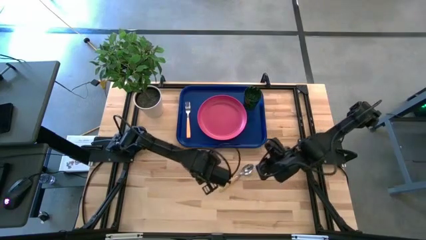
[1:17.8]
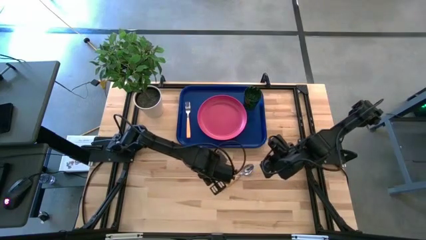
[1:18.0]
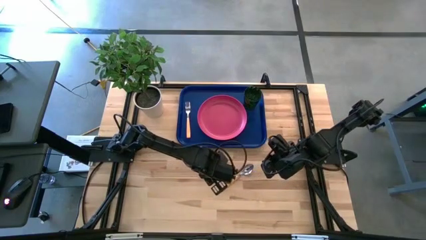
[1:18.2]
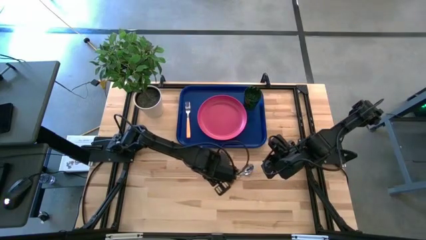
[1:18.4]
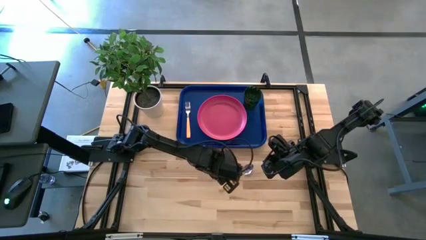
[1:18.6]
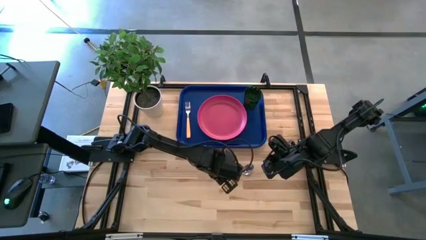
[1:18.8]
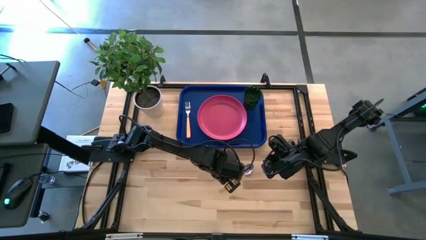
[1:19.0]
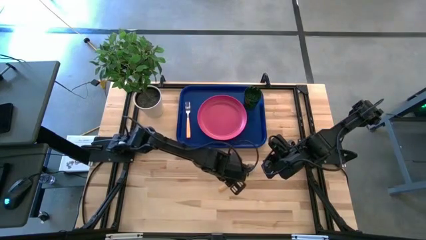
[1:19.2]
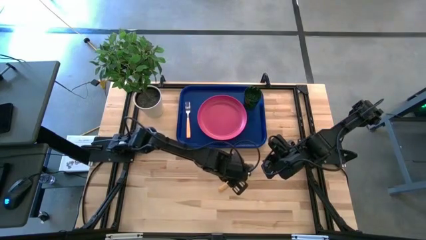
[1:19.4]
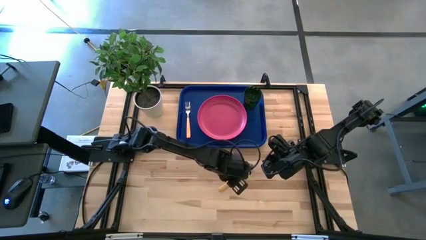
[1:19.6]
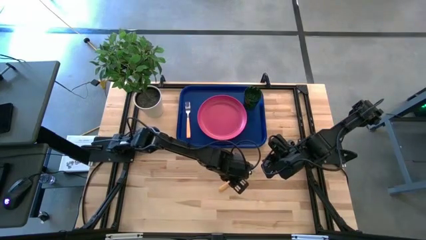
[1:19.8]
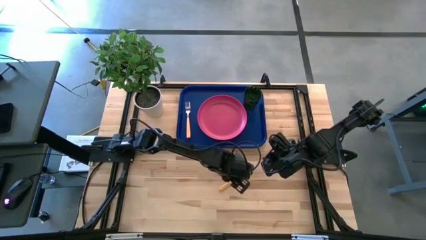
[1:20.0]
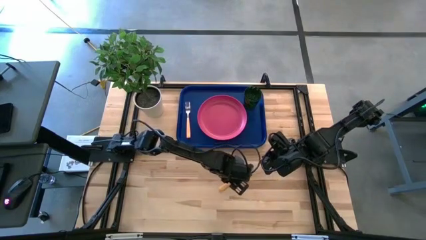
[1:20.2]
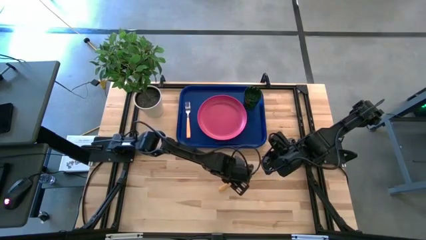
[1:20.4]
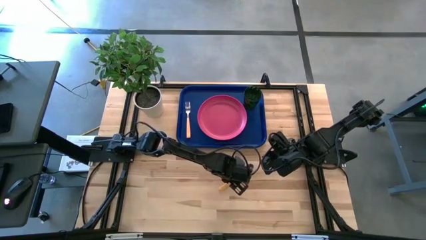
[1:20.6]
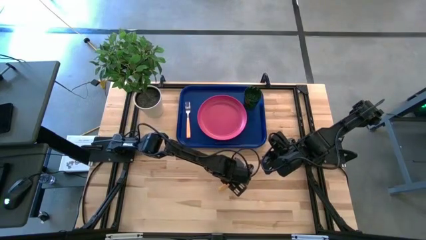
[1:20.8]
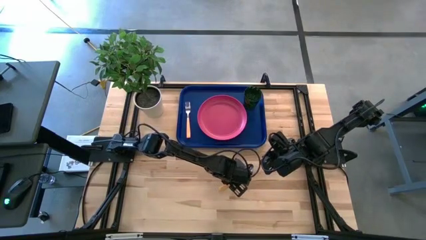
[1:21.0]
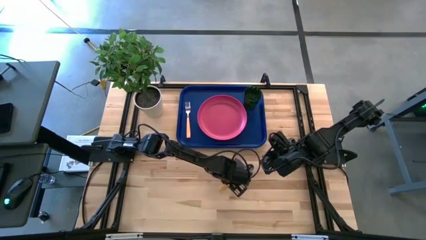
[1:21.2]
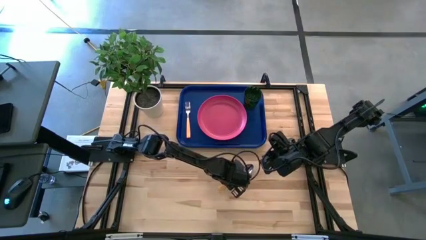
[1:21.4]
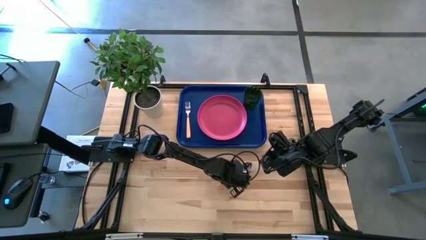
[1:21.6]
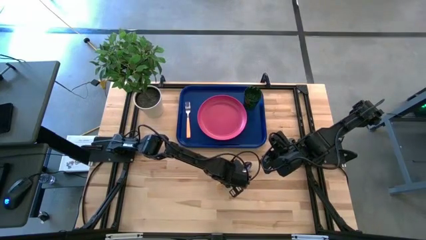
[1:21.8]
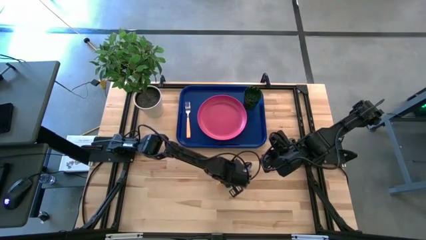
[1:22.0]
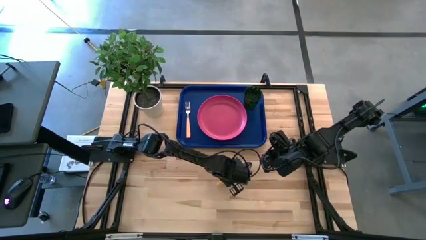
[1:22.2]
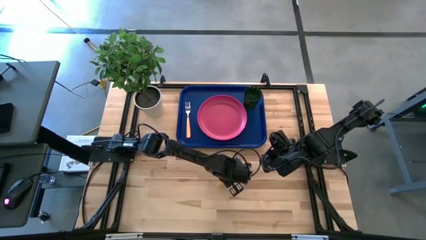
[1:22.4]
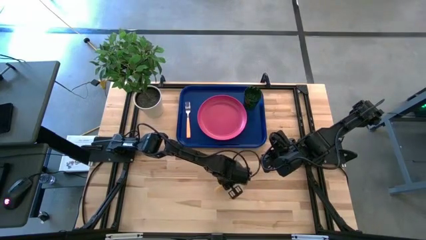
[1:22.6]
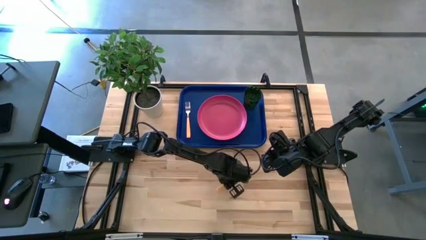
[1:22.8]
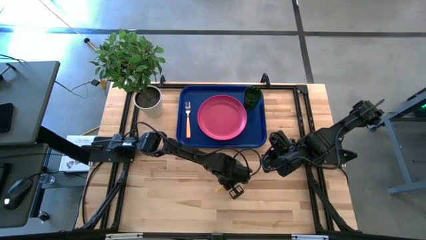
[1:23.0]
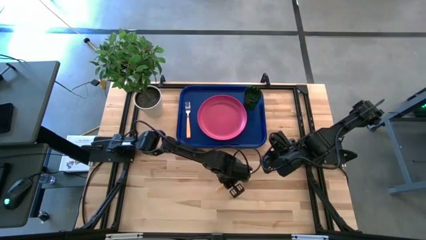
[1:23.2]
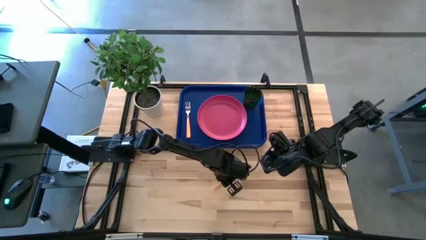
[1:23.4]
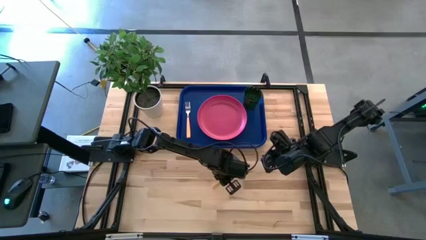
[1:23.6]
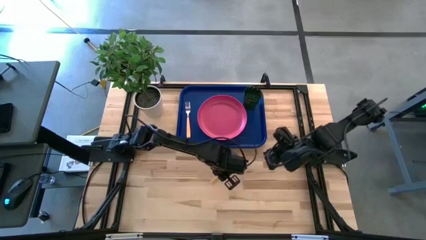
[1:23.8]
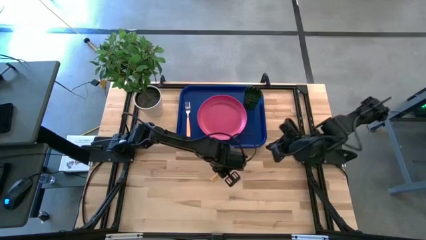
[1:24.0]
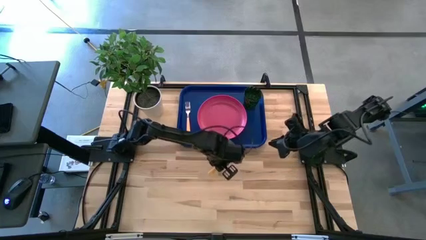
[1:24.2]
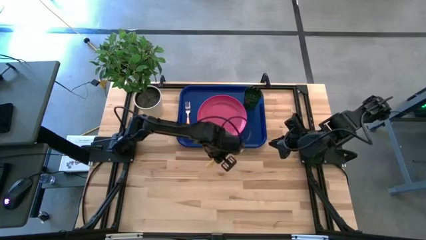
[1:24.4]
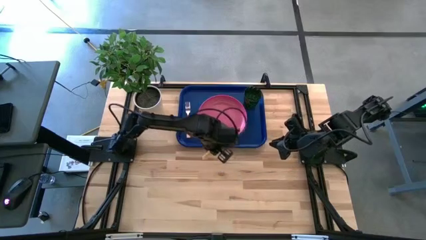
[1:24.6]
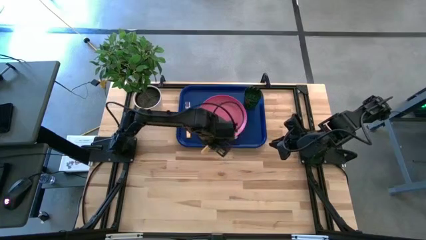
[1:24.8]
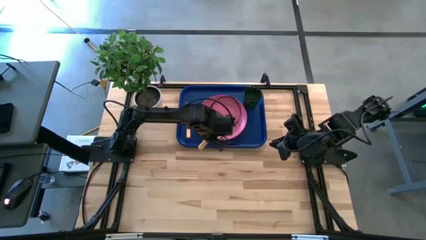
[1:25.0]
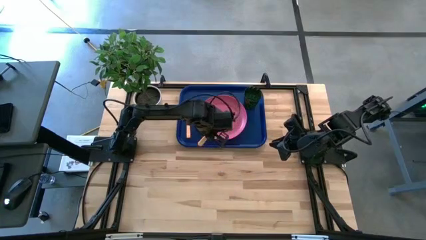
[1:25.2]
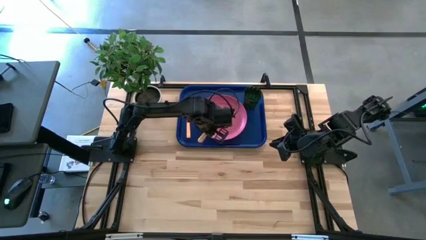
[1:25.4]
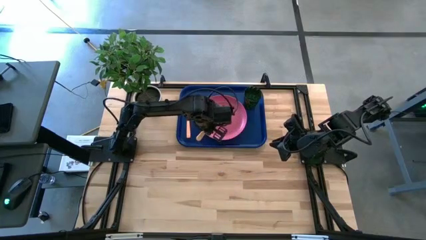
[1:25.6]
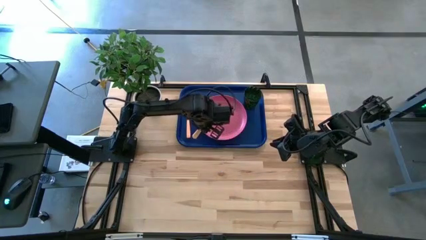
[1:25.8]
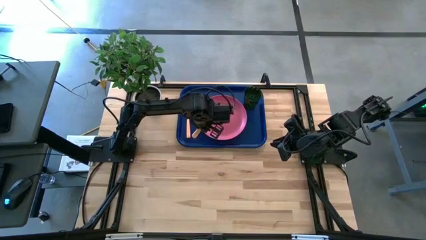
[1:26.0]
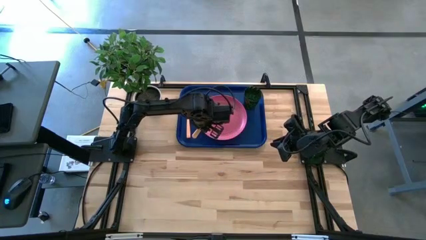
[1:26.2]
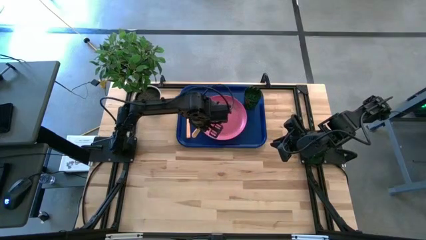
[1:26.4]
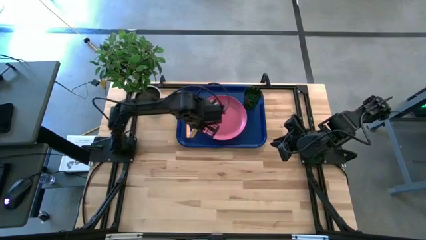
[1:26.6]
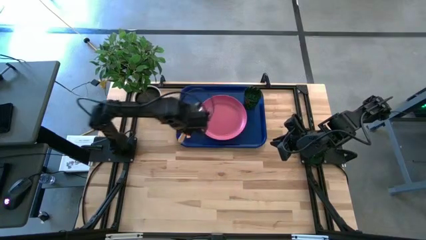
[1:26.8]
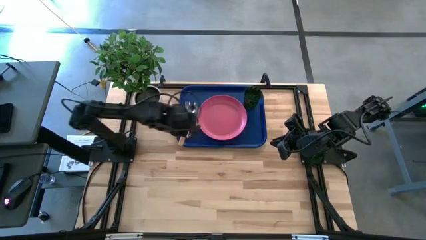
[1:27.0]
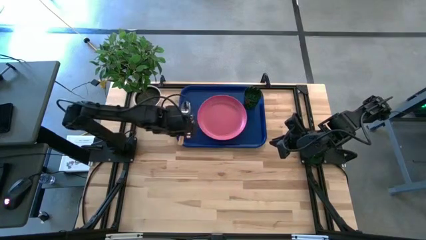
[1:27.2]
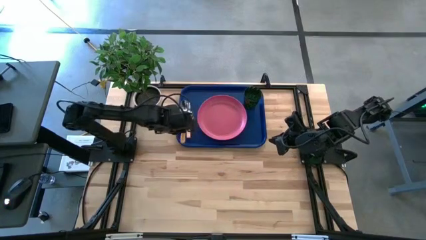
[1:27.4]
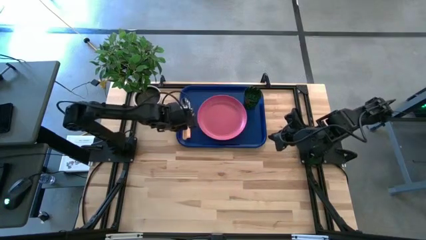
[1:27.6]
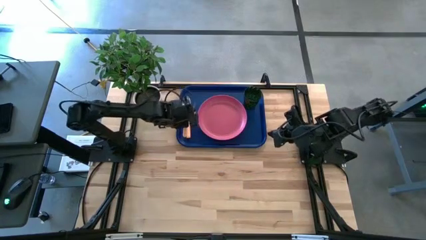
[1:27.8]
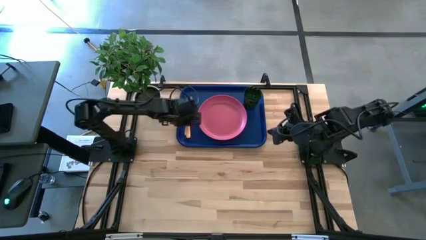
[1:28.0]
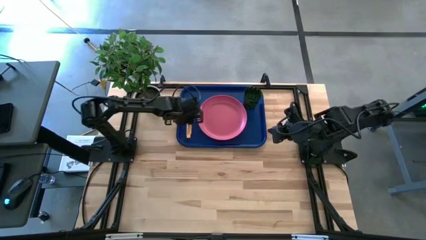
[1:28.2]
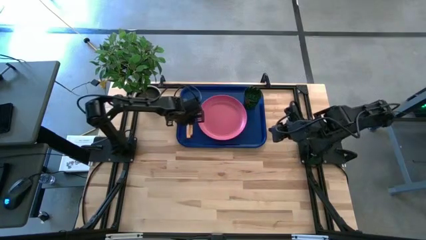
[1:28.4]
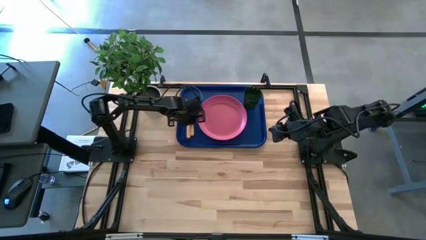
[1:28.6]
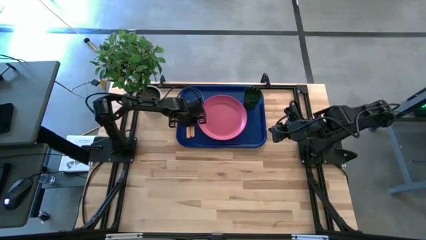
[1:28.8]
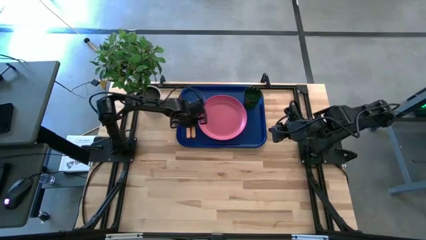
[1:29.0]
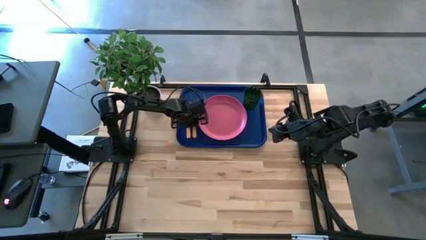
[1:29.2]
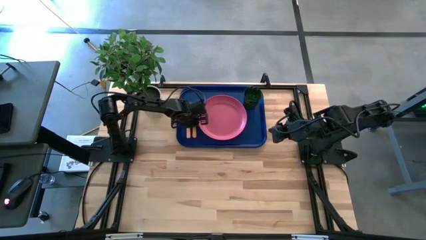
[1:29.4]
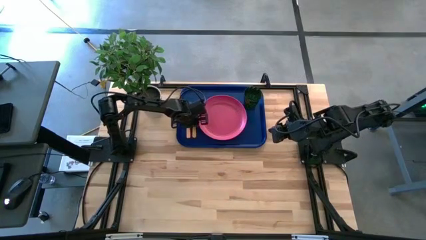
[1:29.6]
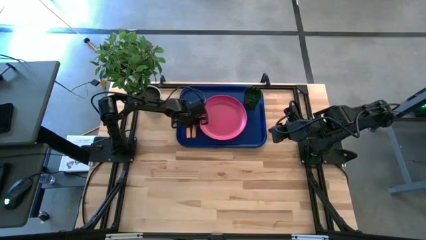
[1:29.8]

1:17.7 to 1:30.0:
Task: Pick and place plate/cup/fork/spoon on tray
Put the yellow spoon on the blue serving tray

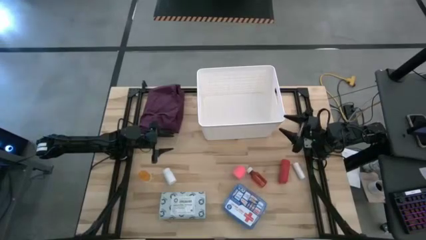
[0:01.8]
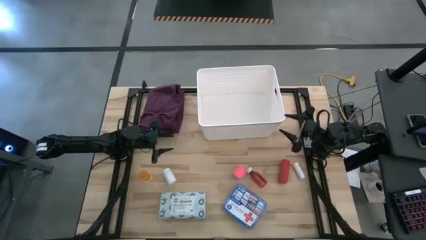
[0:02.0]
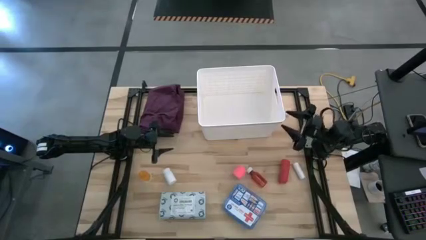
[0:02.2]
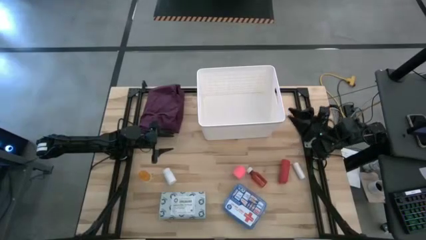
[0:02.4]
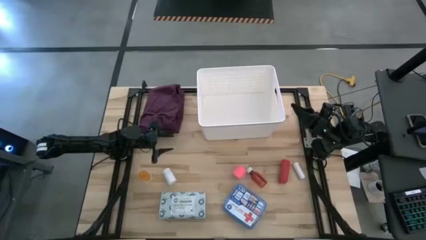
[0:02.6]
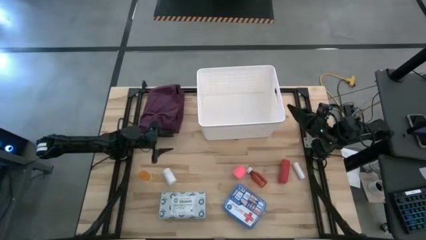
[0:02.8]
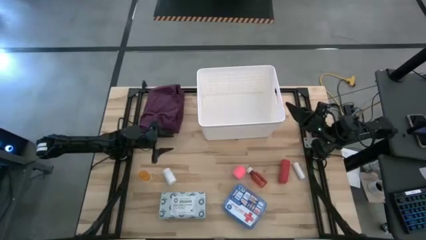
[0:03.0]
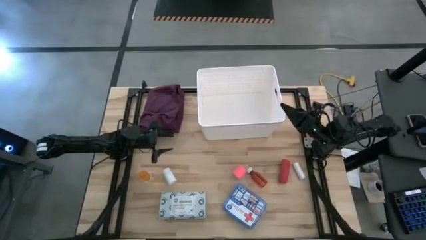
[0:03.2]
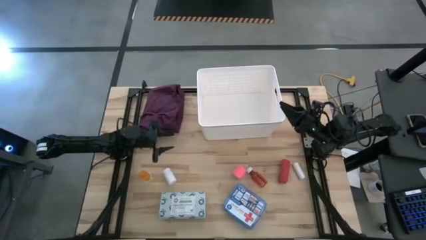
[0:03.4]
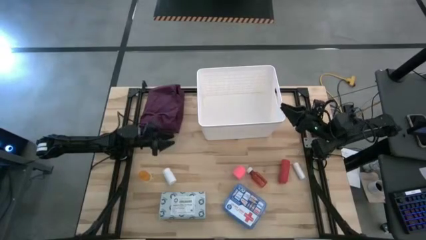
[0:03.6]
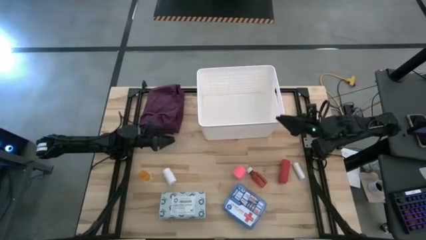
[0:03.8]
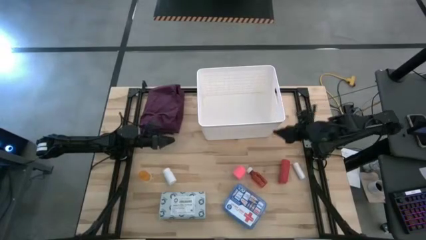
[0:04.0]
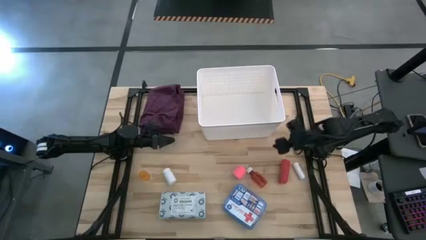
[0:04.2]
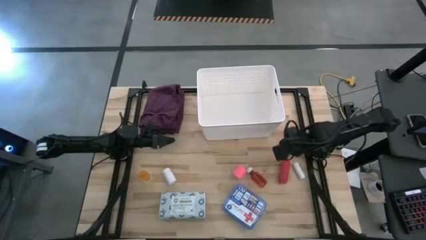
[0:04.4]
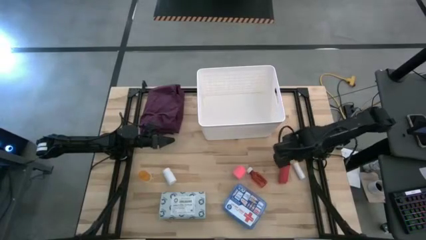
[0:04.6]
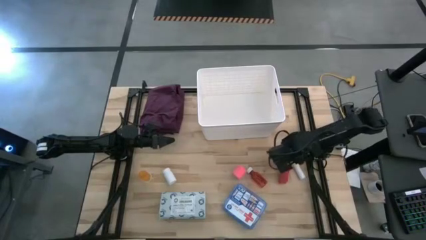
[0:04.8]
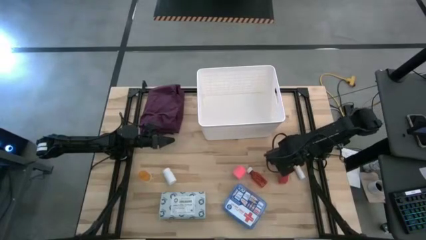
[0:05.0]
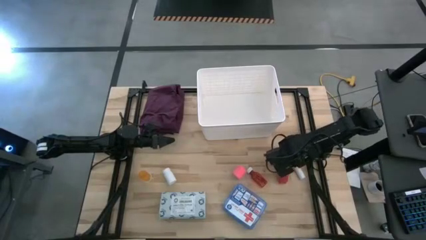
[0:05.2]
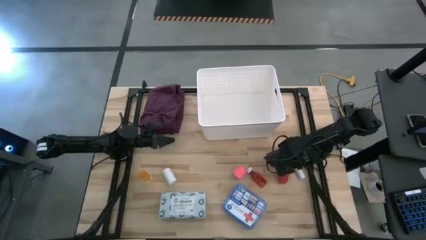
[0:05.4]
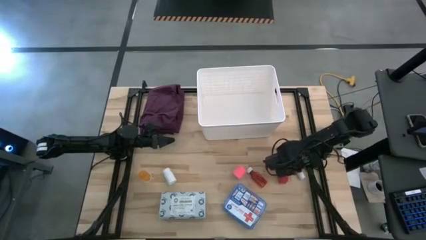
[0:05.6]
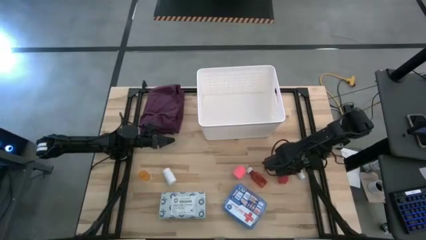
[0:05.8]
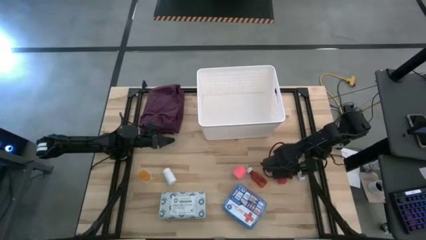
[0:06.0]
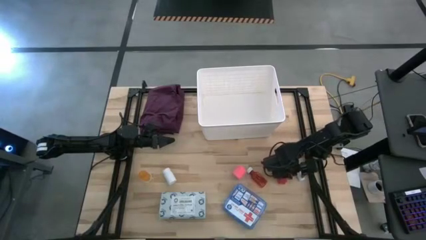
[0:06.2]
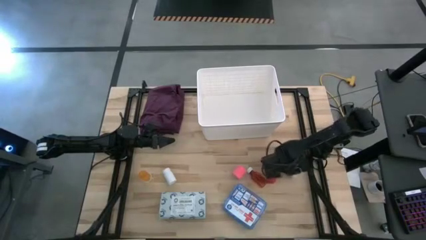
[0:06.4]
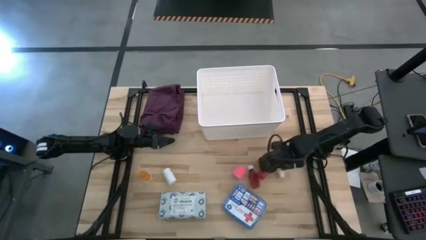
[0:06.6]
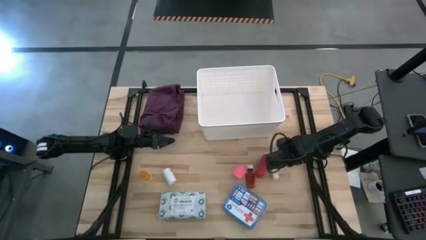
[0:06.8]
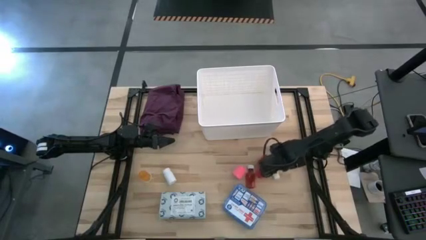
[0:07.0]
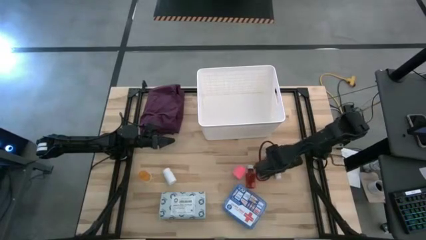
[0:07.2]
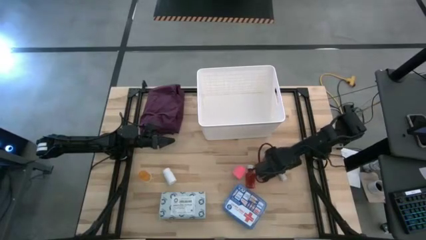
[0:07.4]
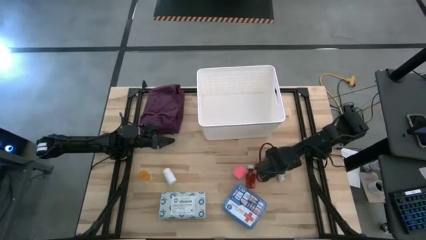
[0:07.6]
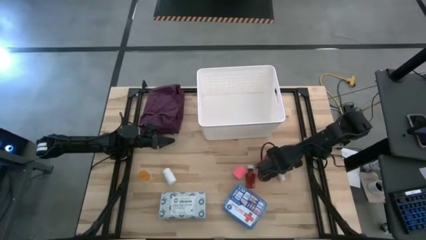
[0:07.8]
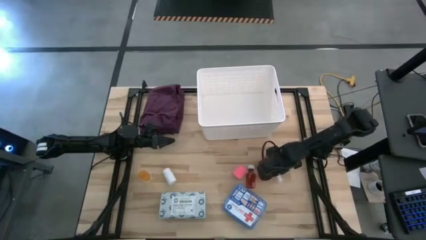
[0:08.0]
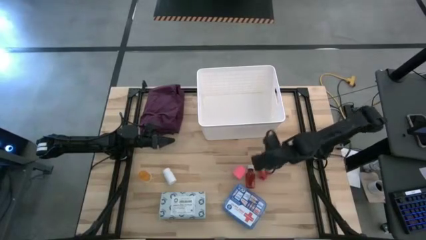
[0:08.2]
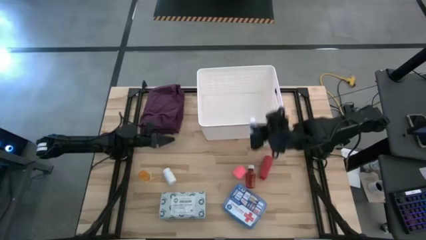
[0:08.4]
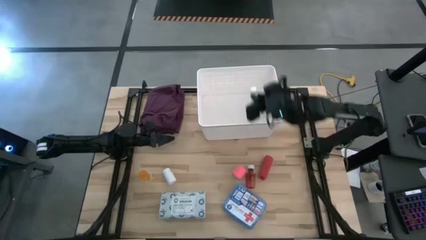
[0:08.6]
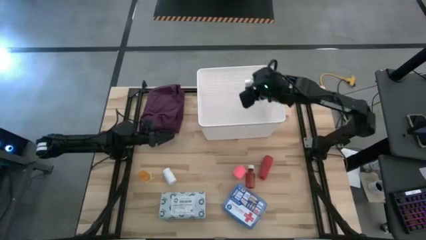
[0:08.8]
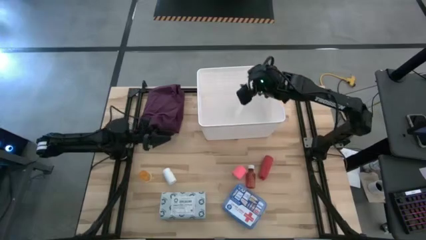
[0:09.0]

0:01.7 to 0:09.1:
Task: Pick & place medical supplies in basket/bin
Put the white bandage into the bin
